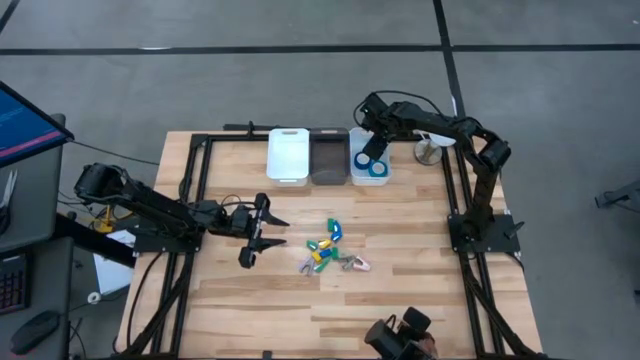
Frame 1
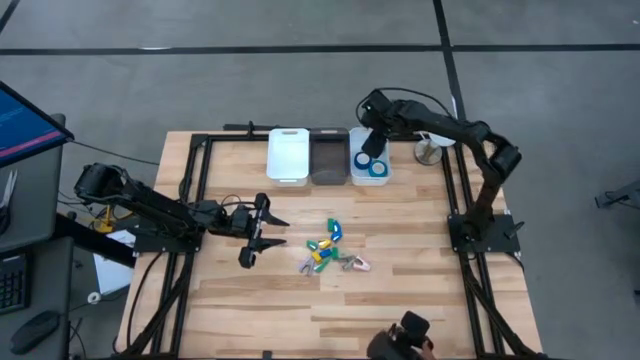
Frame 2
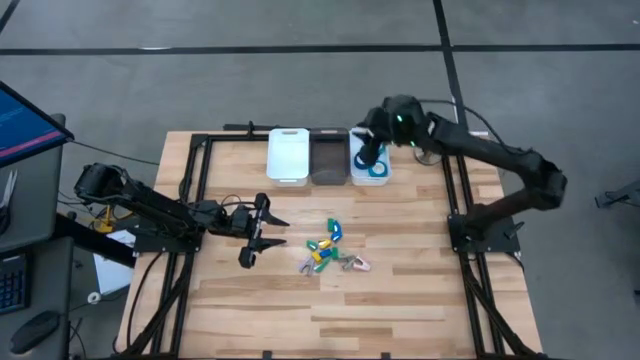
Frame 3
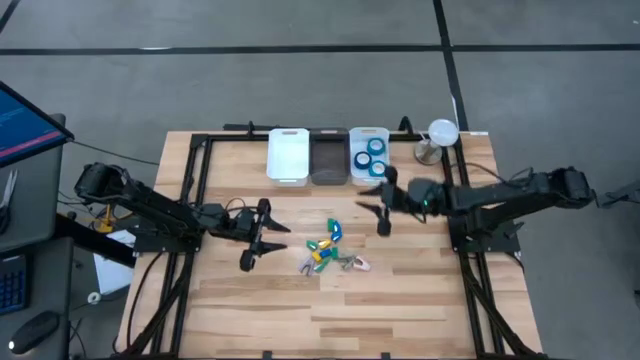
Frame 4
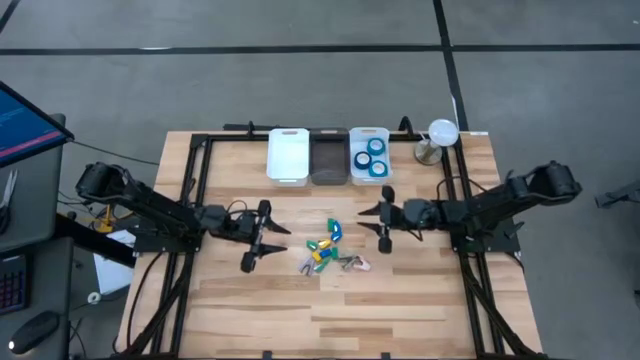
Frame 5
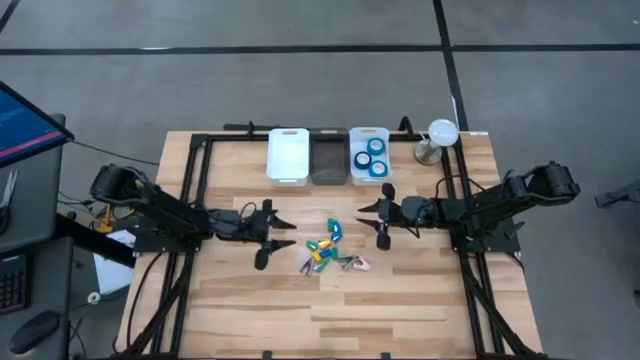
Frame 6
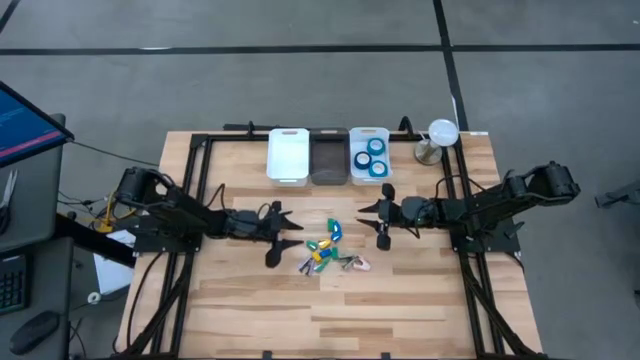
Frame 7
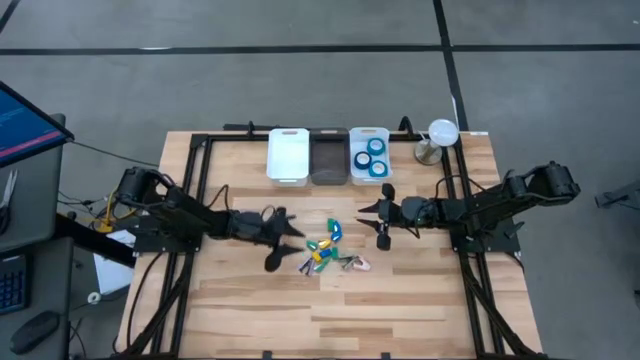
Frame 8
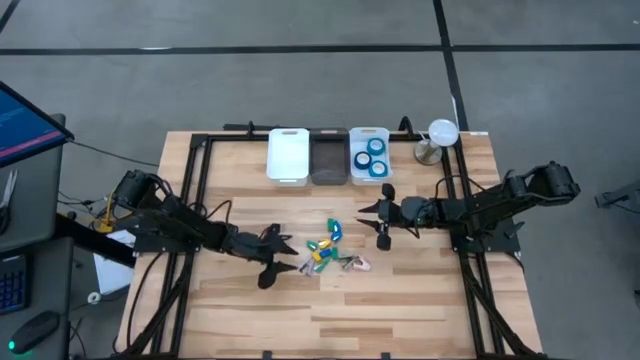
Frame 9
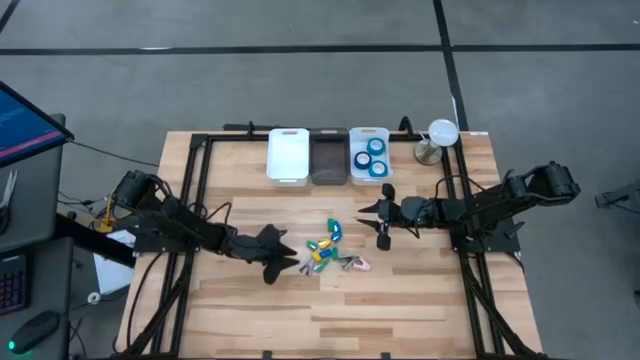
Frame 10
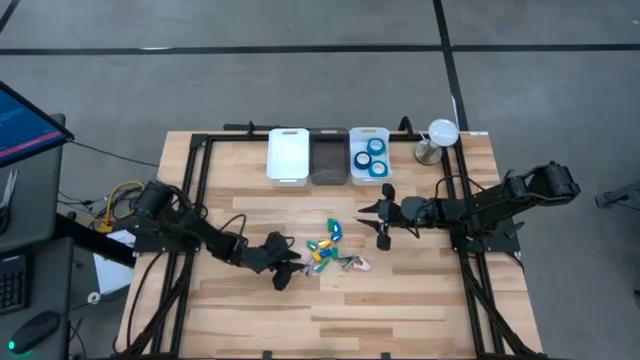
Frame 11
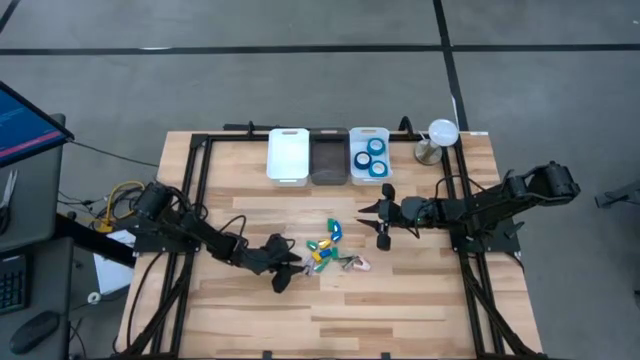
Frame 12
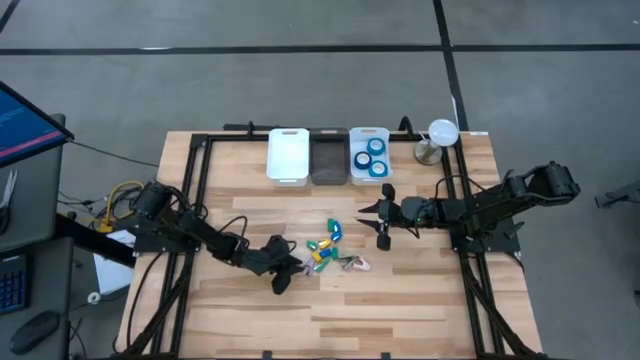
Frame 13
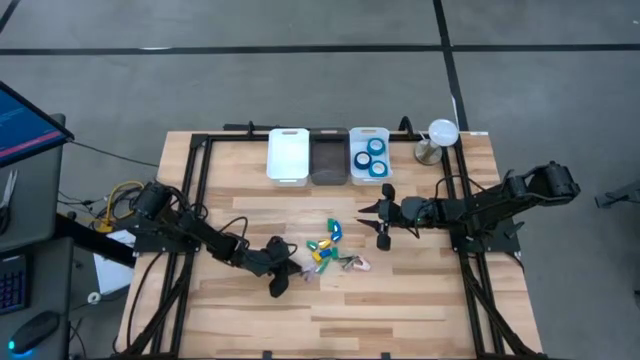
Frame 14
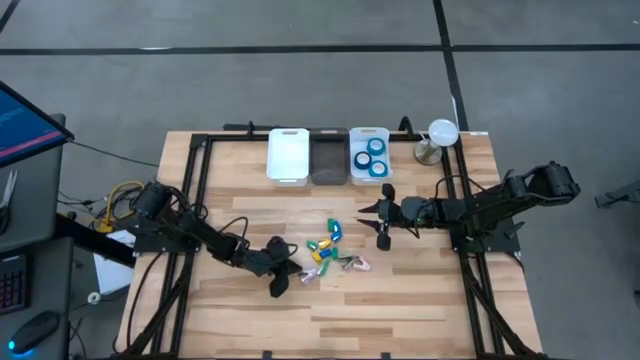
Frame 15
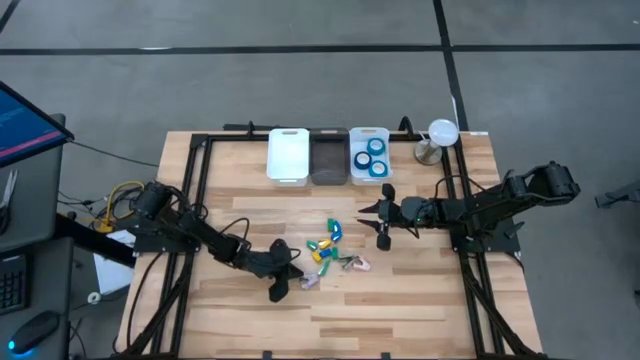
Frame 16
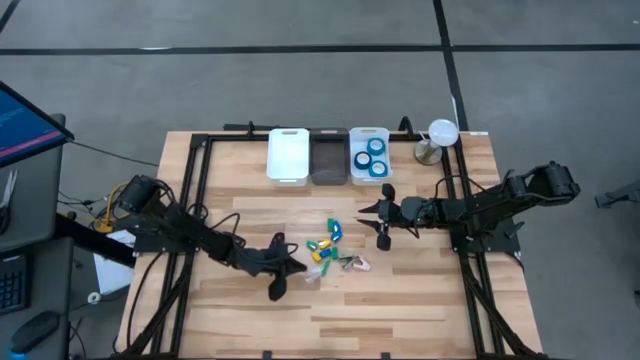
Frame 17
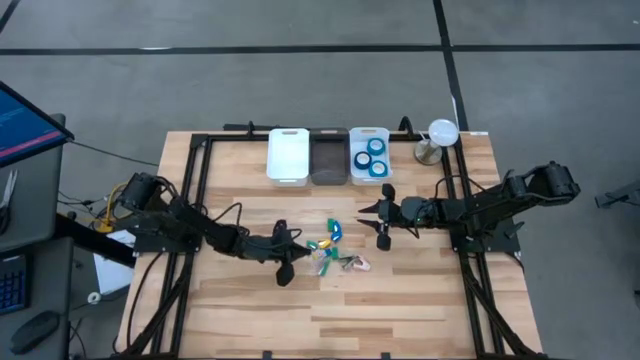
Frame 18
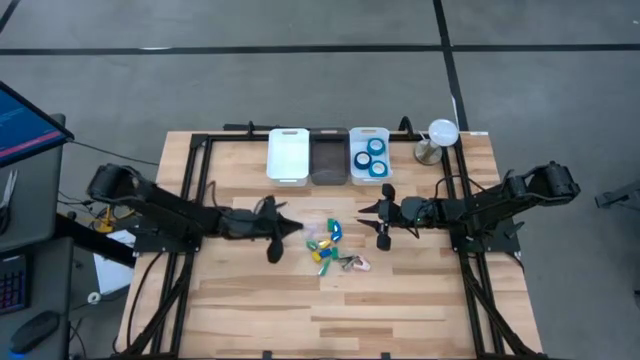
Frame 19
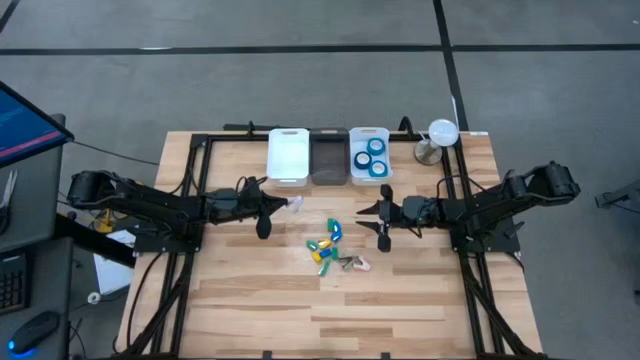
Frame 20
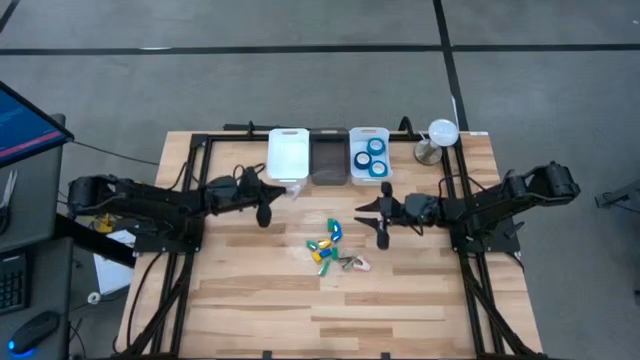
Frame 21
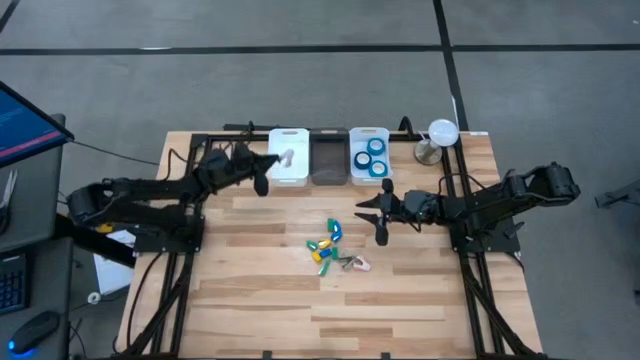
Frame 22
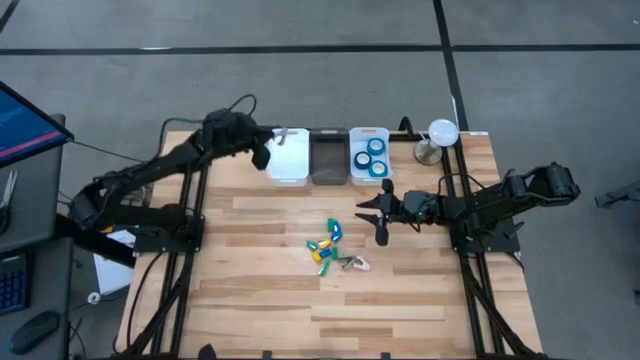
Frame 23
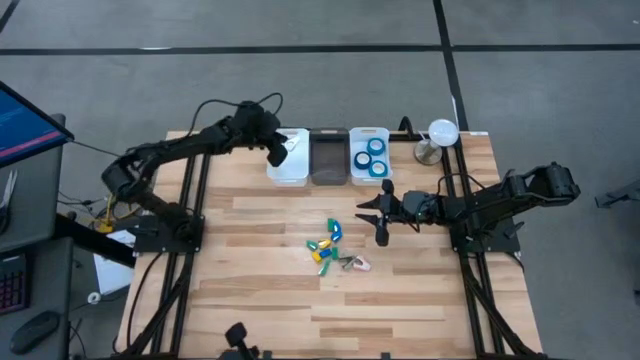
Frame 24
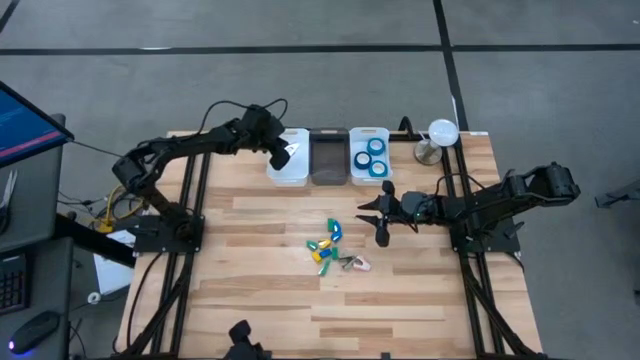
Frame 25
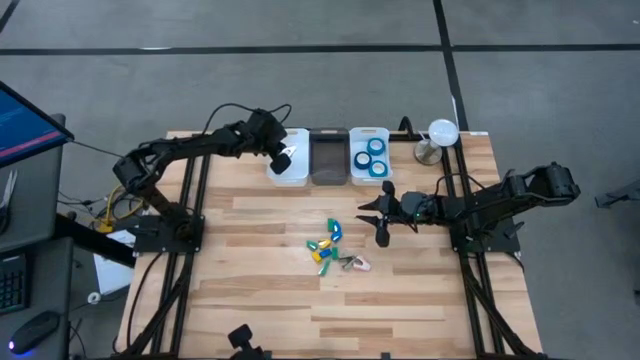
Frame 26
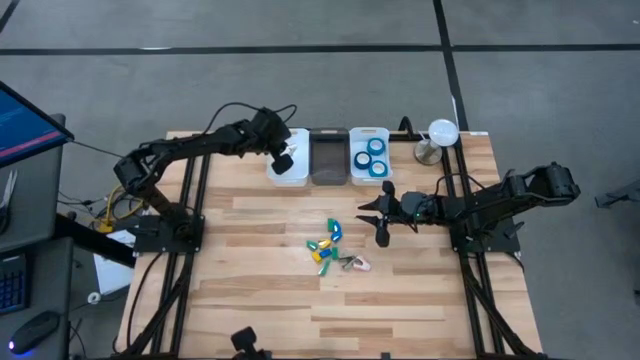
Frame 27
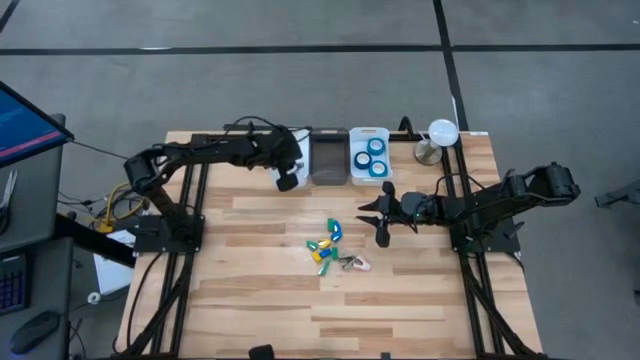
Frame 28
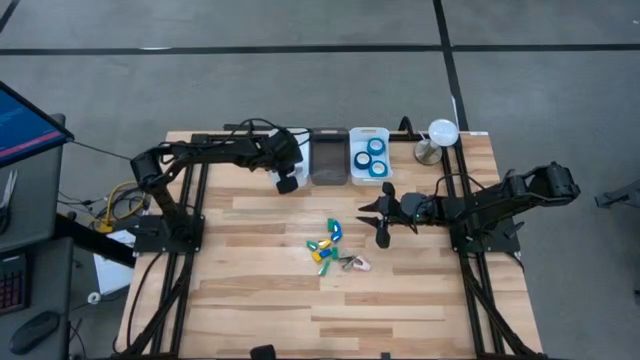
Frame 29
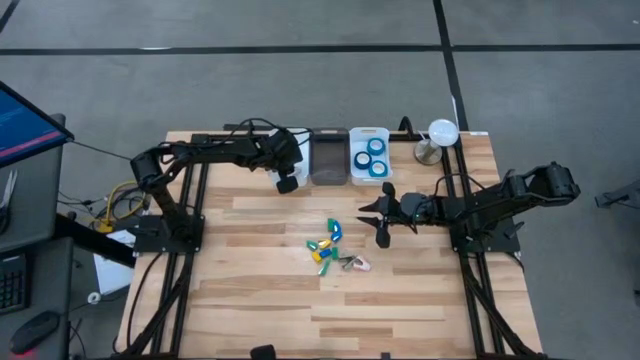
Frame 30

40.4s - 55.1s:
Task: Pick and place Stapler, Stapler remover, tape
Put the purple stapler remover into the left white bin
